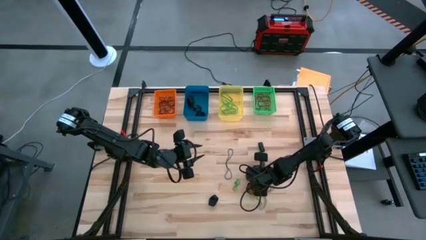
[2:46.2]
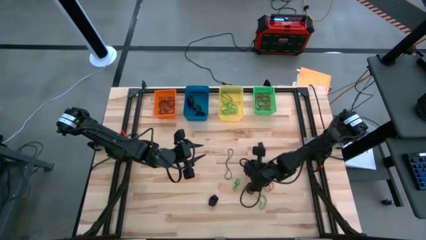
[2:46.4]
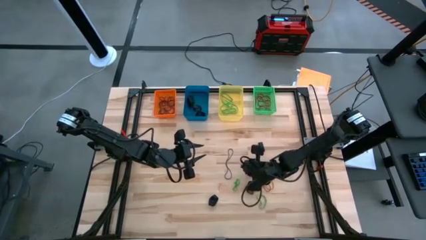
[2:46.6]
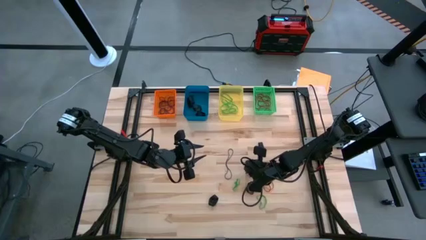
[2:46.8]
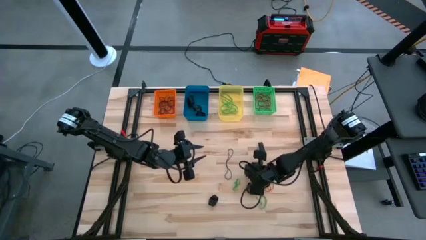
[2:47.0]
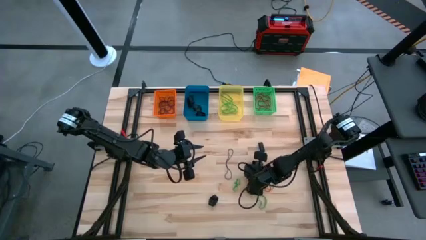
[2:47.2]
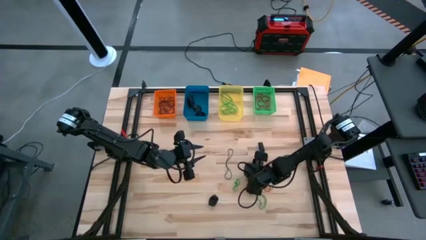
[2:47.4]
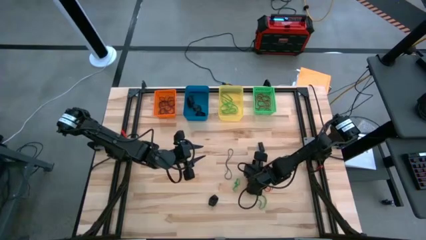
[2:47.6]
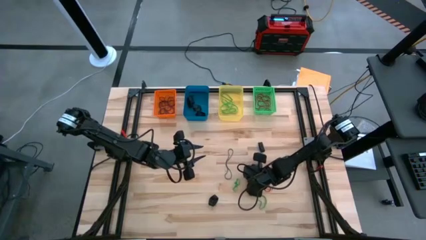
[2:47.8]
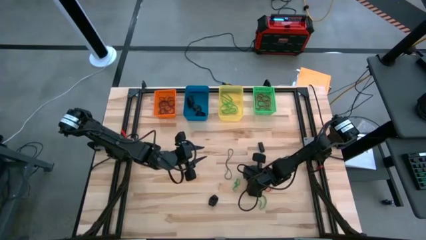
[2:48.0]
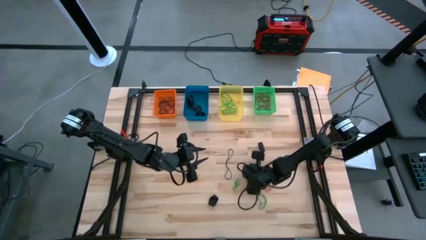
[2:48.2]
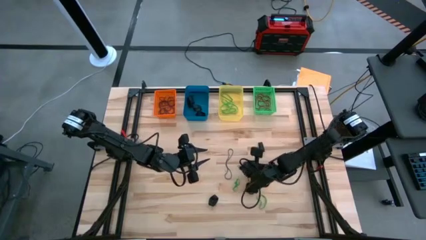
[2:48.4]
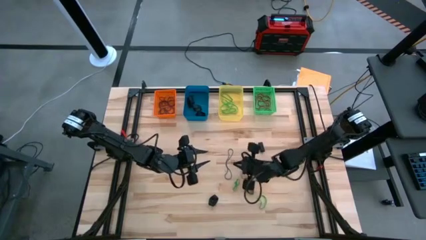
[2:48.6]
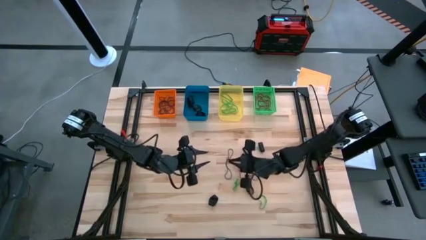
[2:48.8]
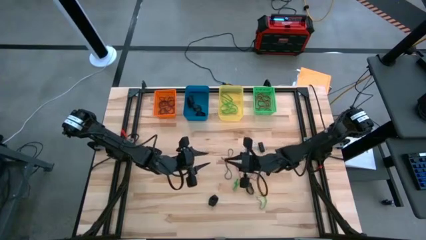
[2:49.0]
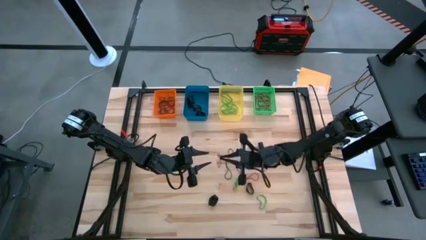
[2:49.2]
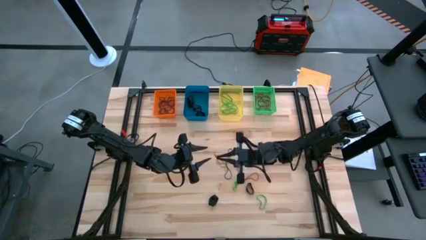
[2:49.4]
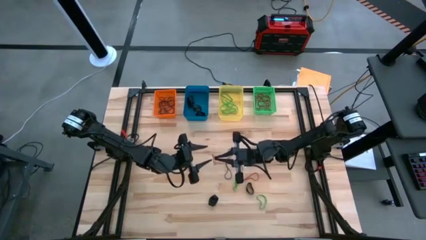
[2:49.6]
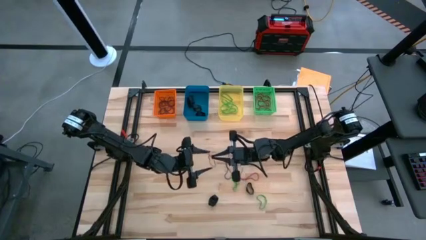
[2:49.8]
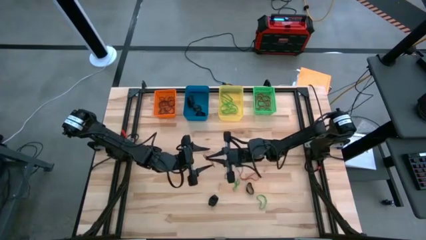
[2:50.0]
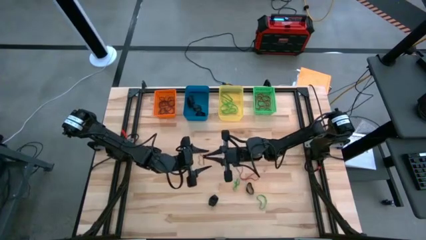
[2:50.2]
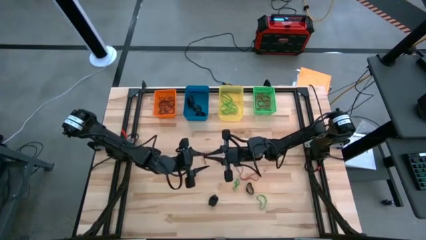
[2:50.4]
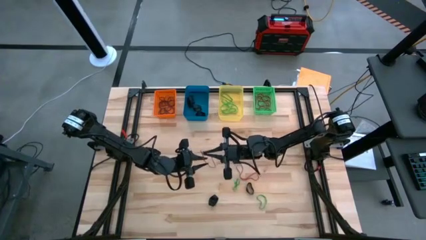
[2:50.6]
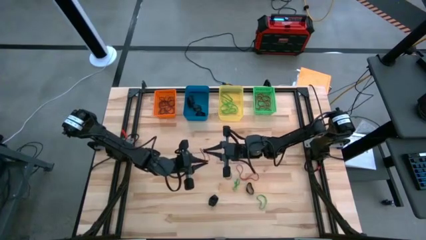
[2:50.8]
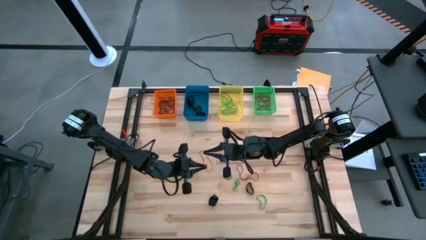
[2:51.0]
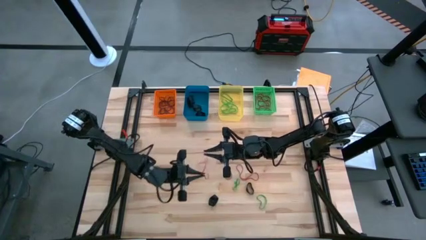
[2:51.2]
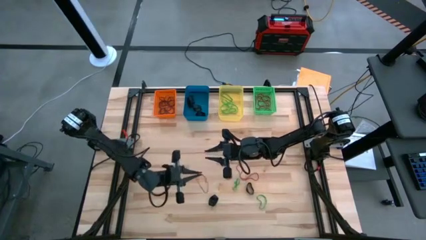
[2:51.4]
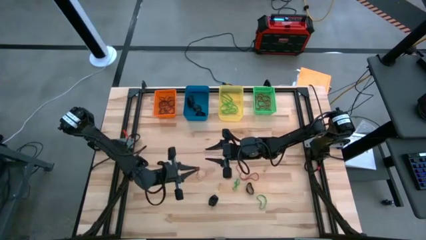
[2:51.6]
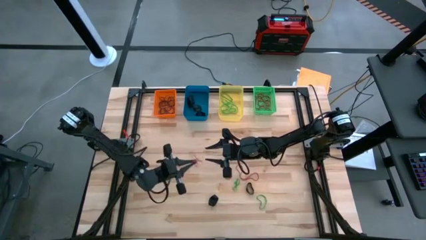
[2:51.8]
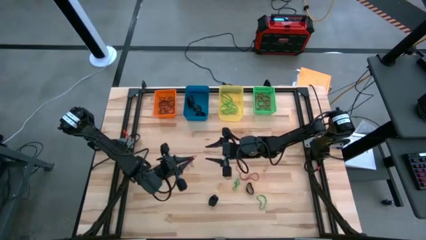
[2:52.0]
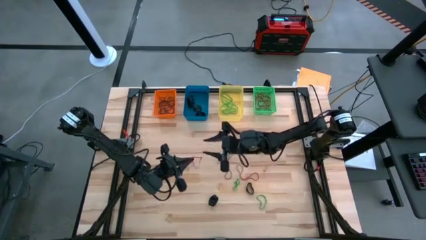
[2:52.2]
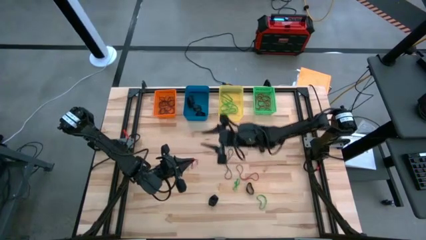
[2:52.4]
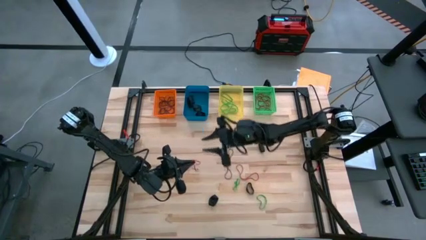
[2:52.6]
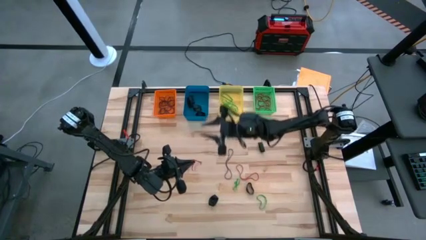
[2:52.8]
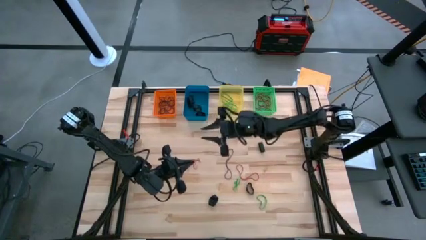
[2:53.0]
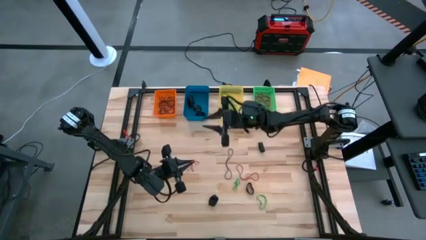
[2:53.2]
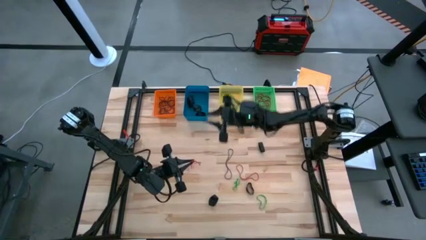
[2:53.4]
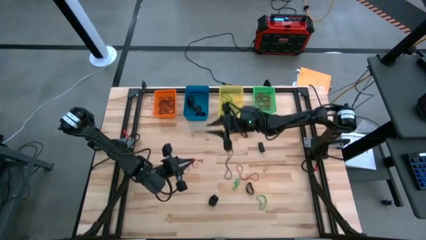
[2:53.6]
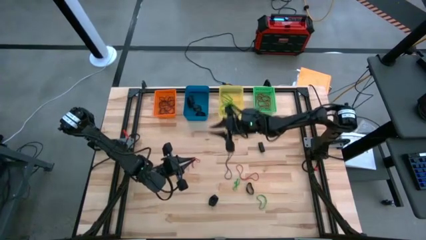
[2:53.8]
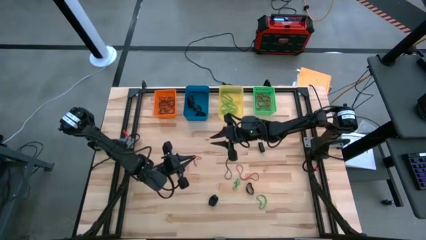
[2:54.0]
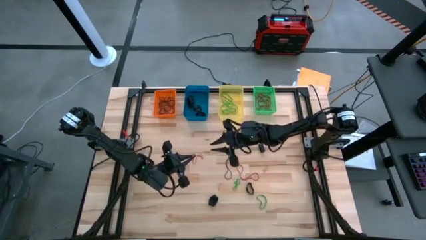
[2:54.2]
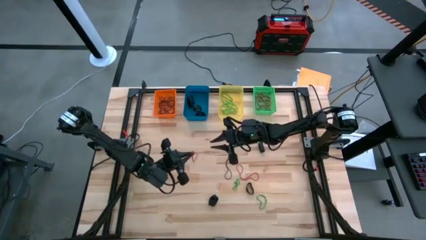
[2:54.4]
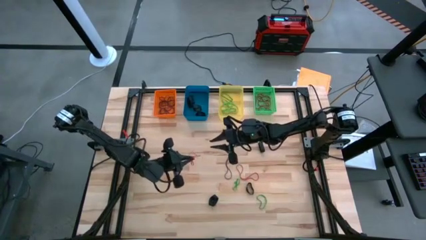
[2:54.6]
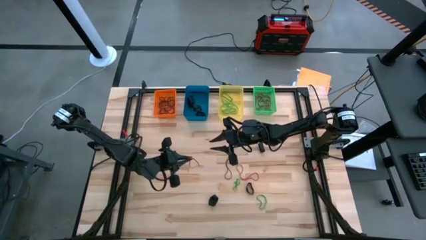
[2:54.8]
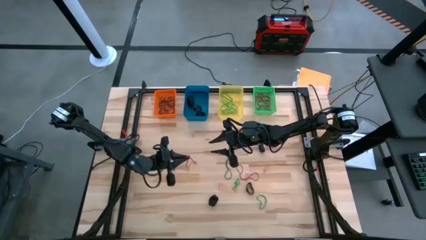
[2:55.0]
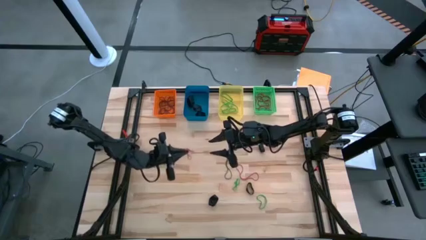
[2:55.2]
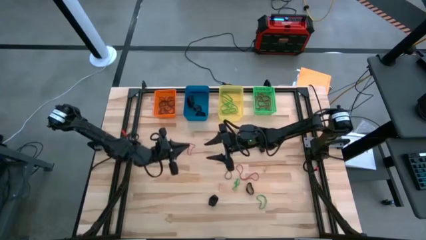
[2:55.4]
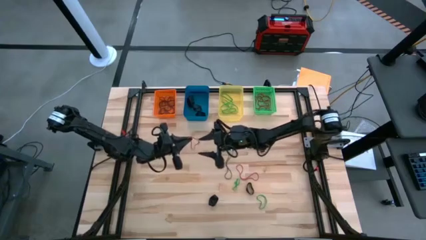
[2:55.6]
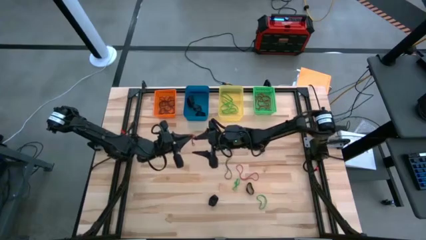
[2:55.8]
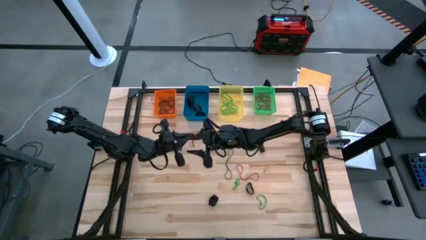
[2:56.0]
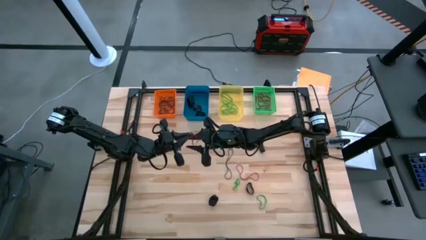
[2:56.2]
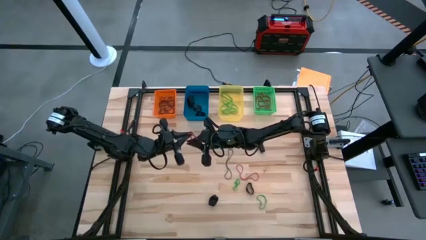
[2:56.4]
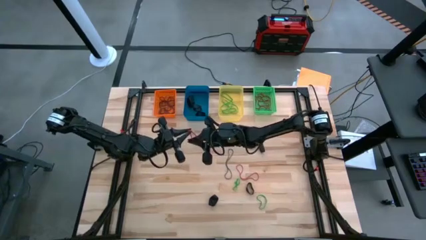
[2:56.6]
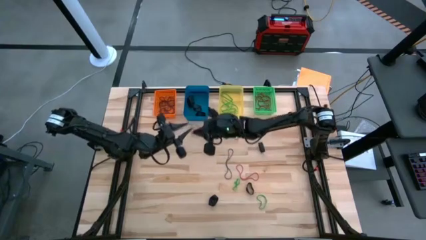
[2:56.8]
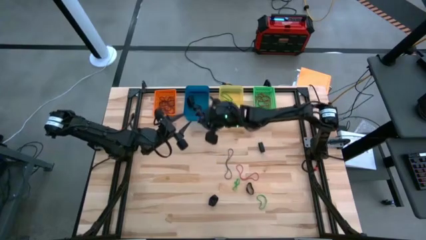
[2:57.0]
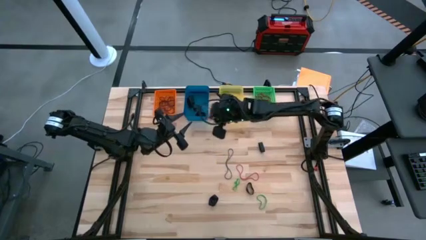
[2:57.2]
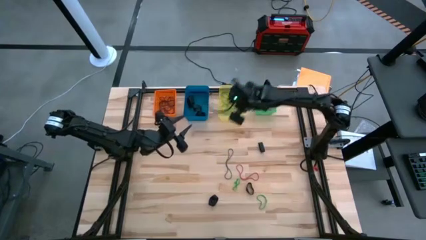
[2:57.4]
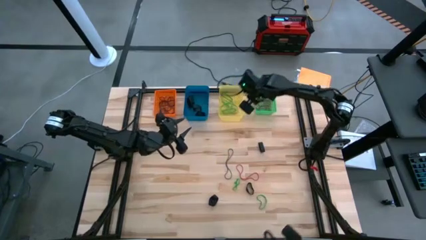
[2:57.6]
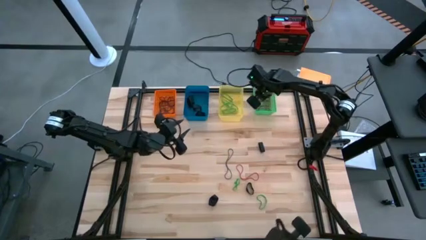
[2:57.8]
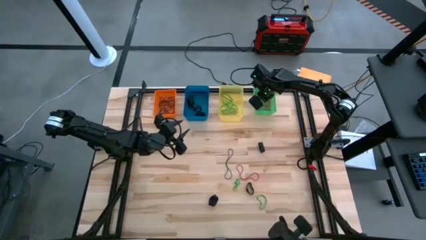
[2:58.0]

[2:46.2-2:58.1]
Task: Sort rubber bands into baskets
Put the red rubber band into the green bin

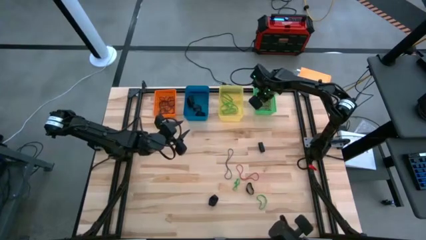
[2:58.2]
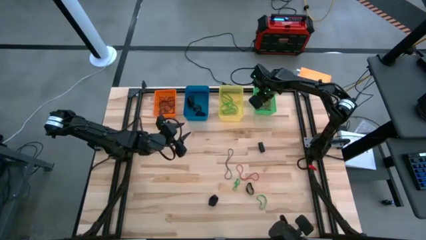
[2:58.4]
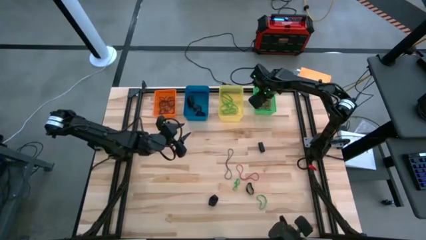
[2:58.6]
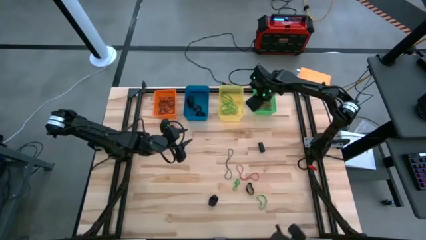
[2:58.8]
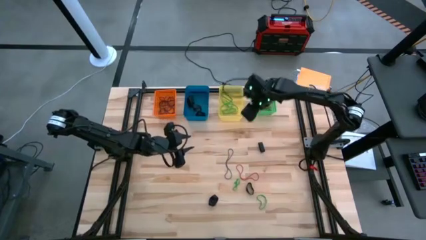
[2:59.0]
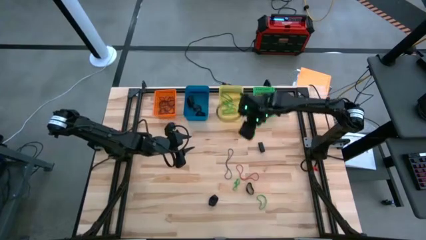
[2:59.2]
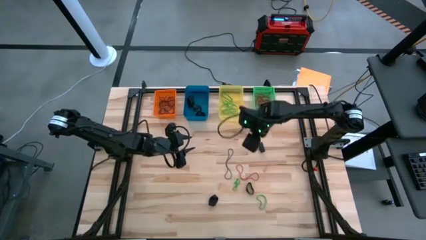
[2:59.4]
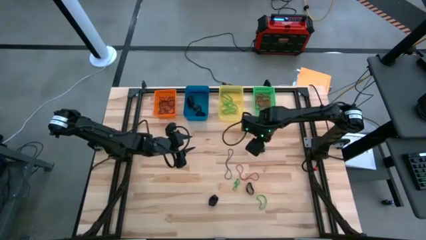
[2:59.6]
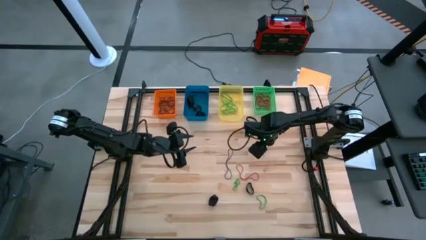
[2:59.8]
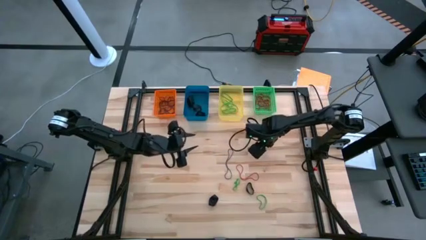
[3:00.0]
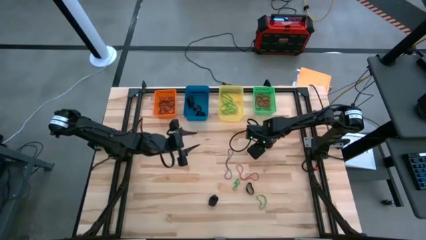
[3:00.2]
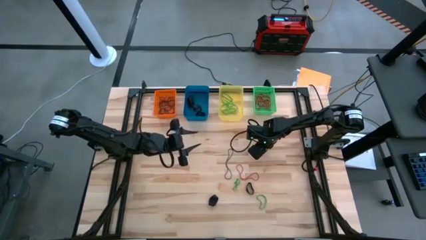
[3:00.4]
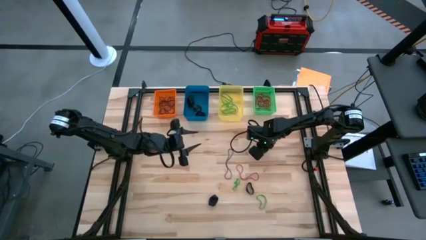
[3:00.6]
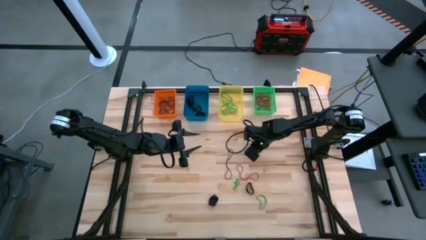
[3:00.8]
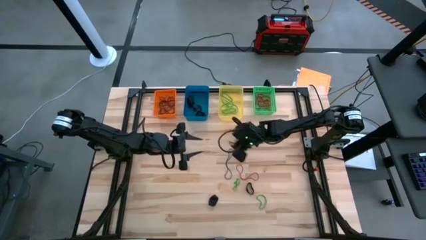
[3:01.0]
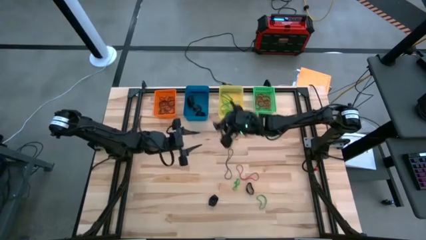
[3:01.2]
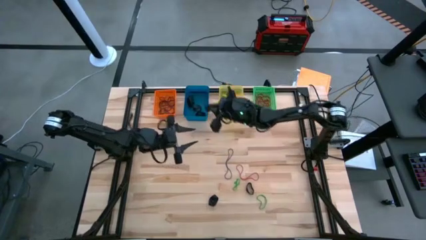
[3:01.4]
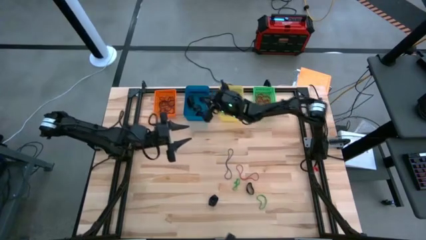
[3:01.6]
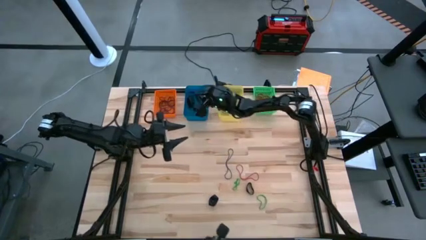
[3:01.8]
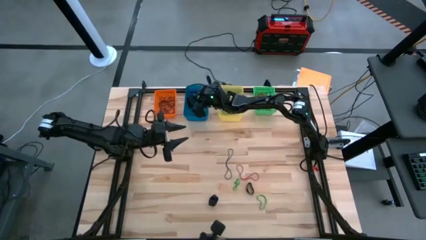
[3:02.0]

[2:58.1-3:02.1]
Put the black rubber band into the blue bin
